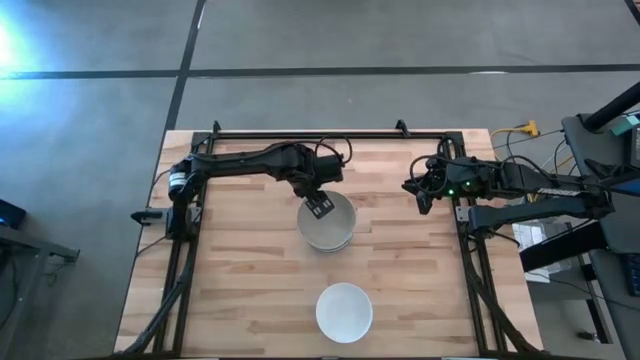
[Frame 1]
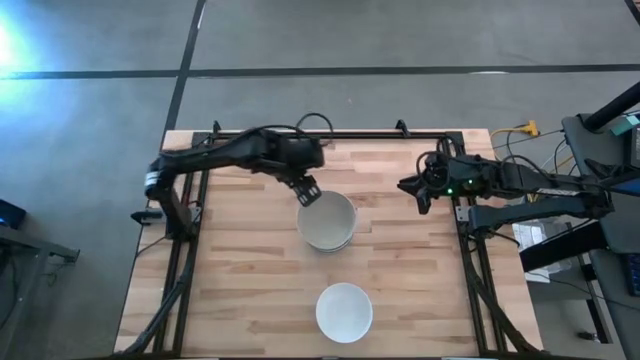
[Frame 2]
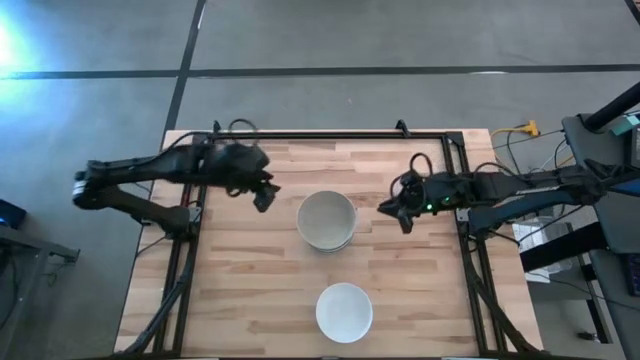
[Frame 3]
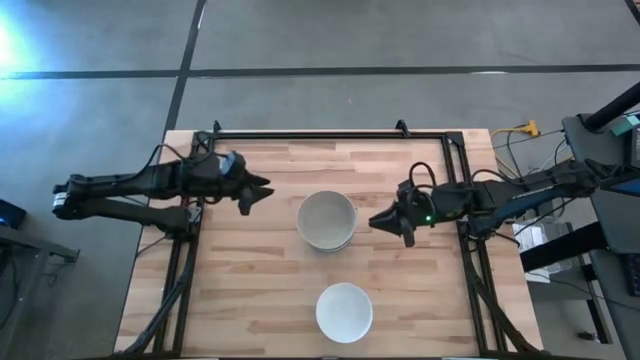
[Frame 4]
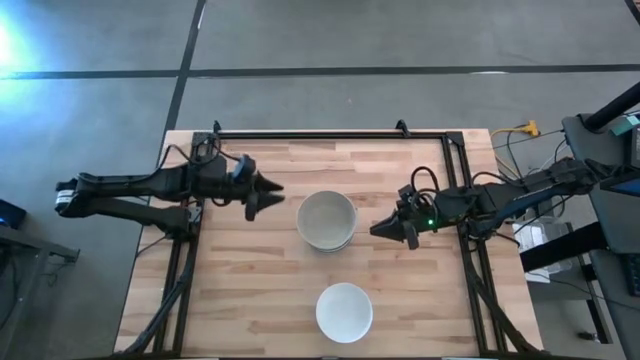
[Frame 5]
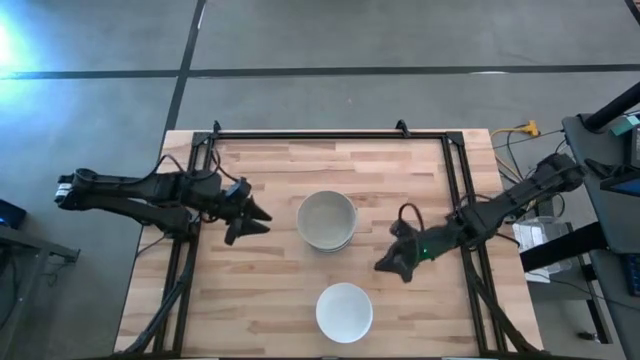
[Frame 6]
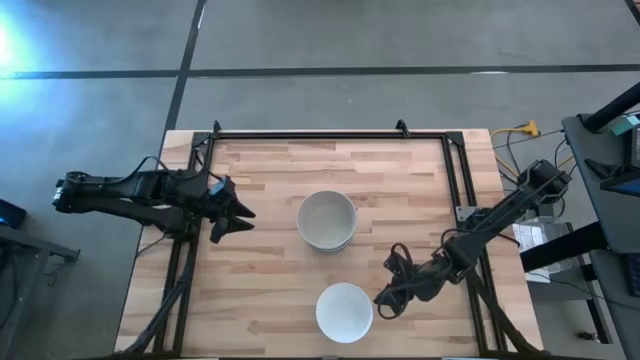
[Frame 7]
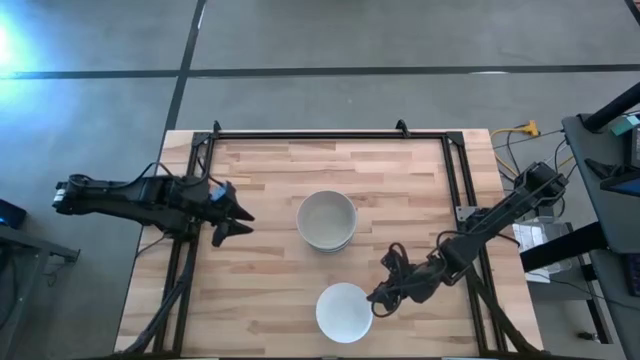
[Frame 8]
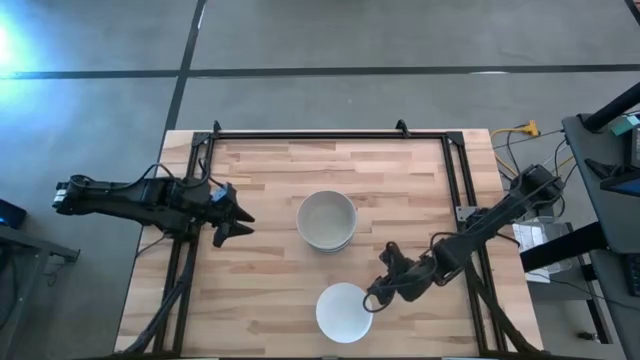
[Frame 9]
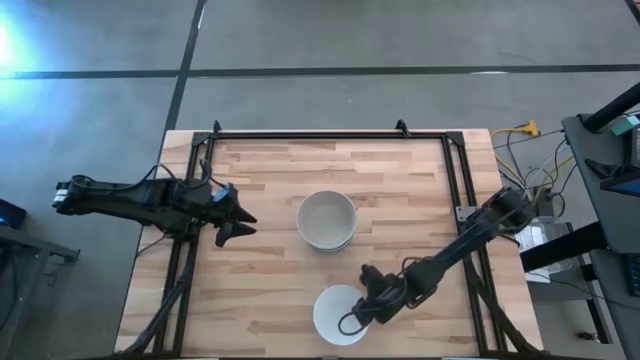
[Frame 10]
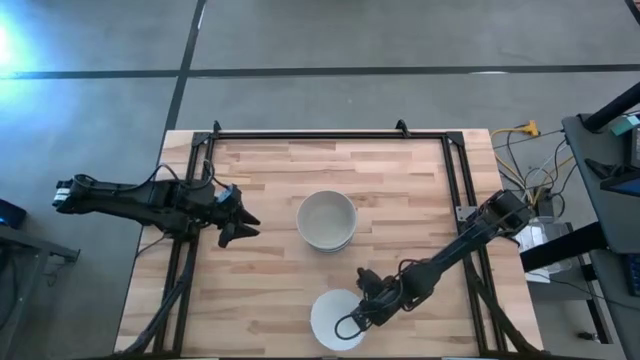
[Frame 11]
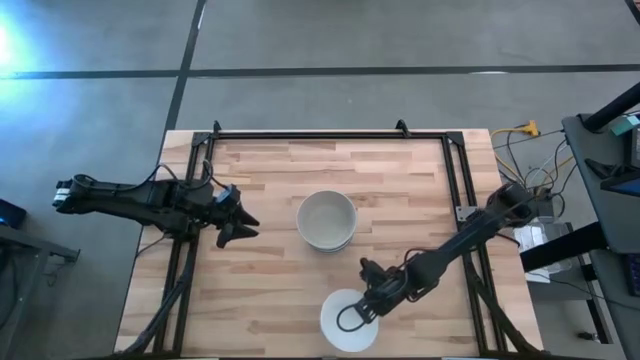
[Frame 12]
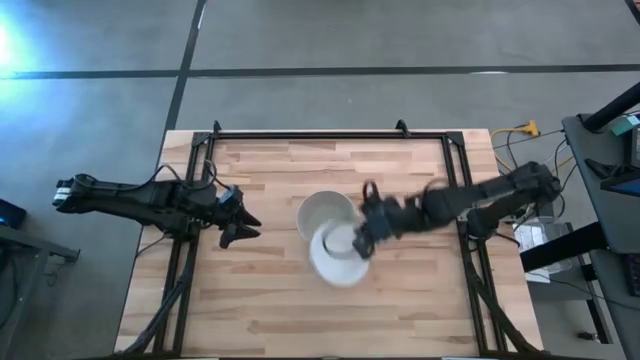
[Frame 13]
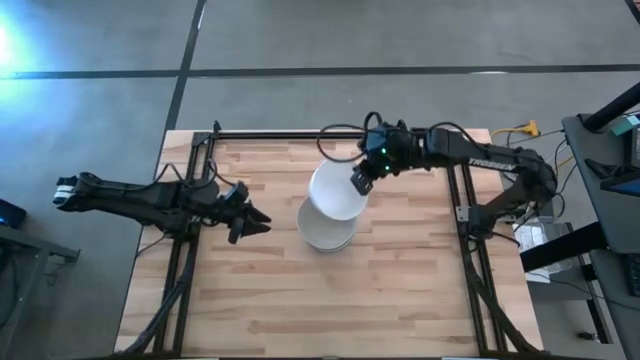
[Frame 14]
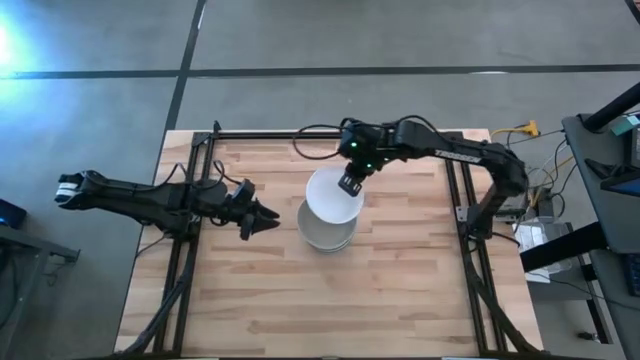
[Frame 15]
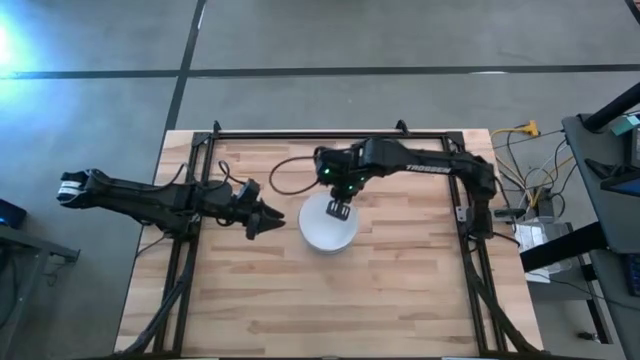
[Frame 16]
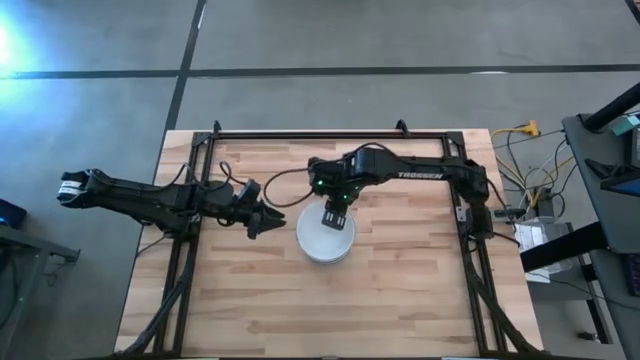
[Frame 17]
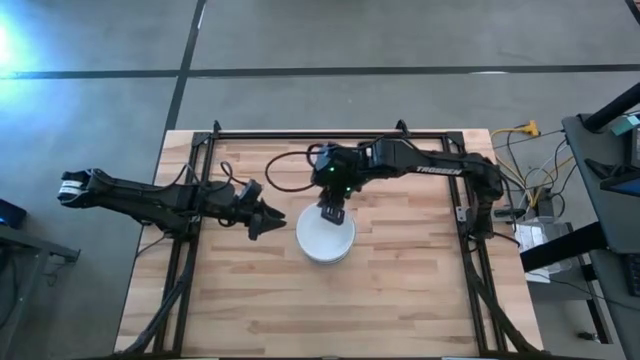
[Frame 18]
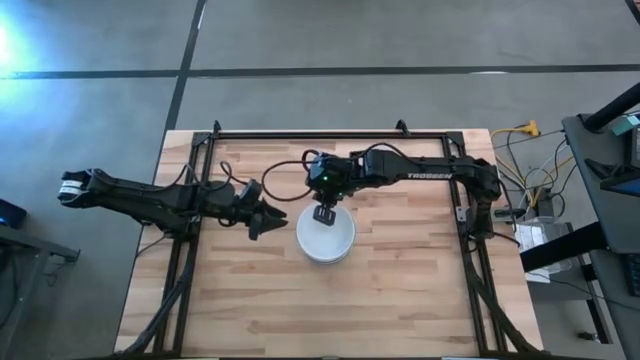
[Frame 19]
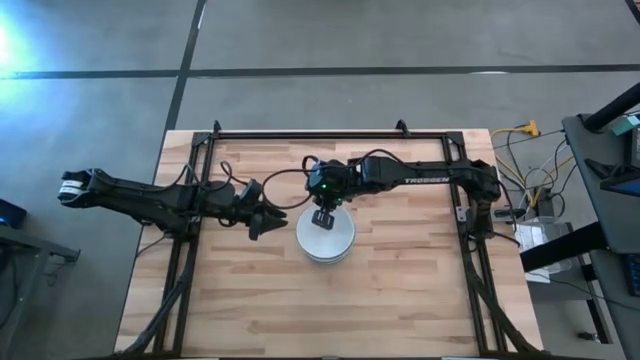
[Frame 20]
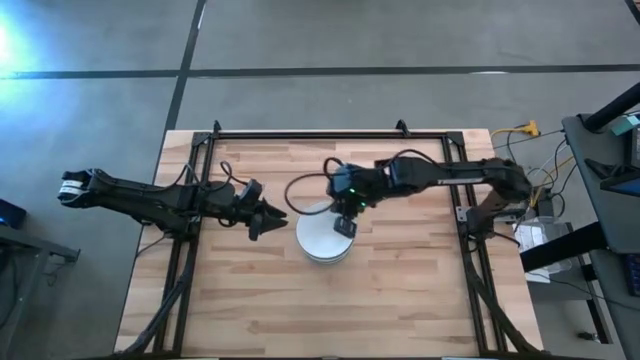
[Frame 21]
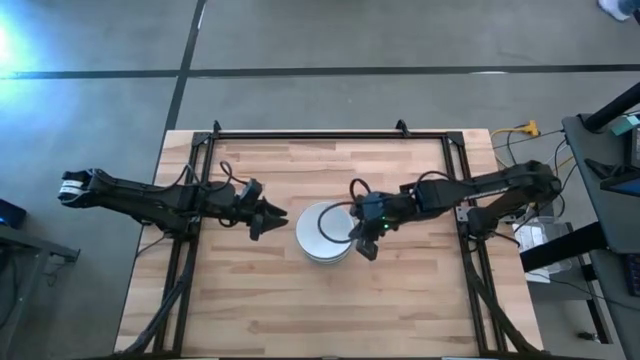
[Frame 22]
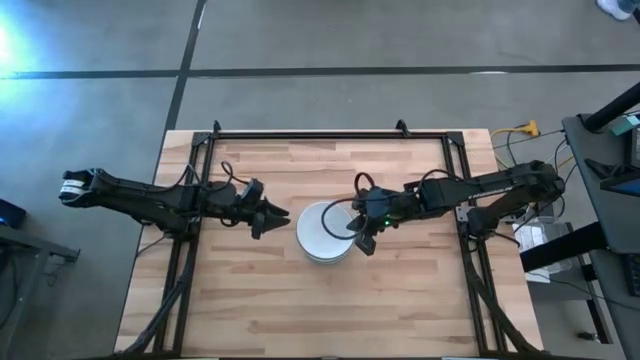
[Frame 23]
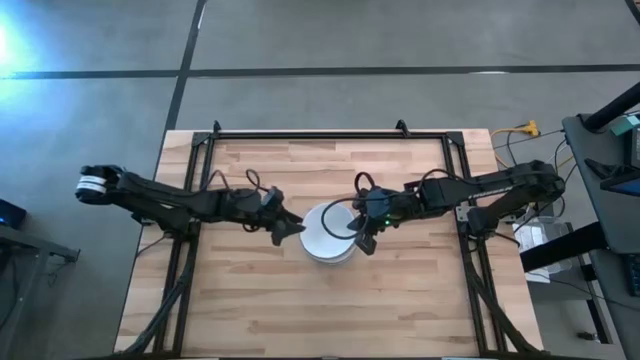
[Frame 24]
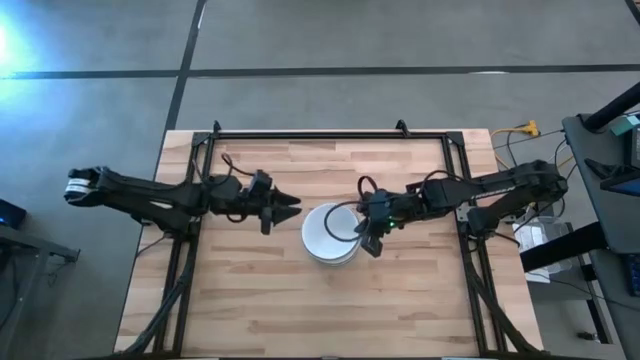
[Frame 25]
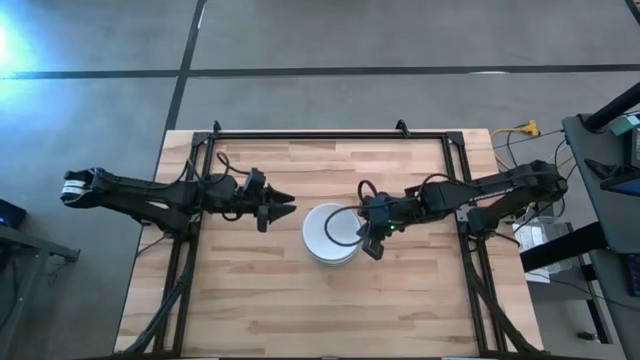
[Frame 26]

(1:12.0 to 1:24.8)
Task: Nest bowls inside each other
Stack the white bowl on top of the light grey bowl

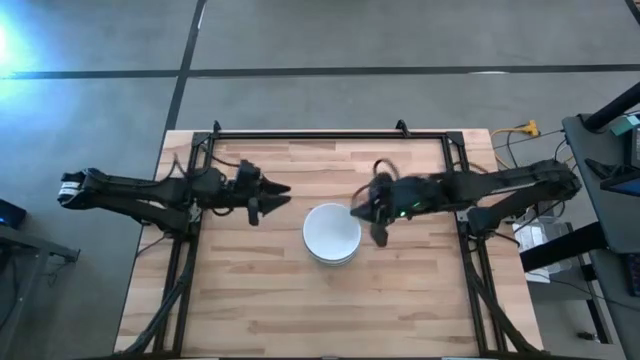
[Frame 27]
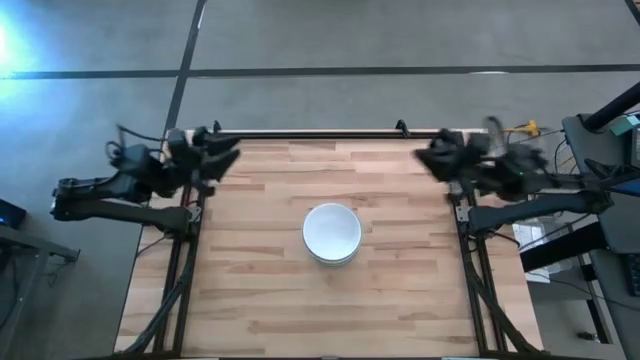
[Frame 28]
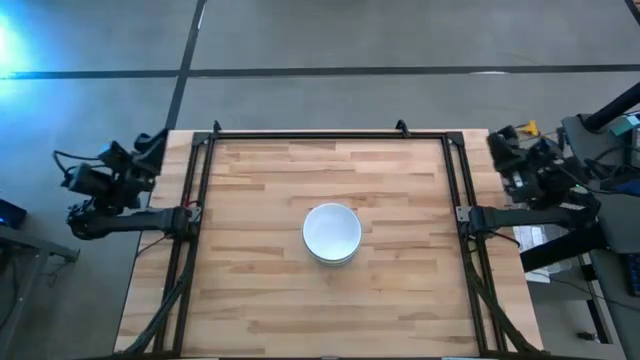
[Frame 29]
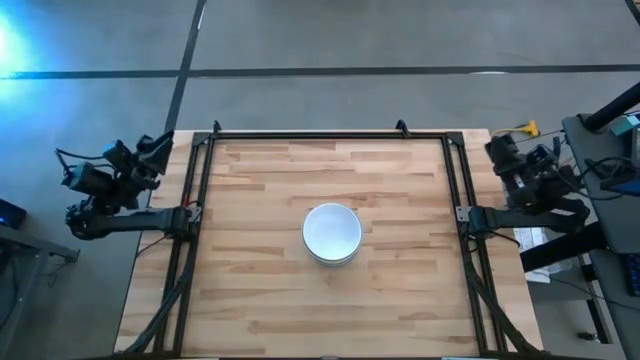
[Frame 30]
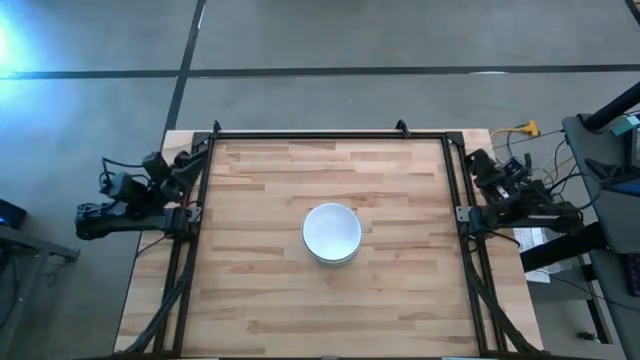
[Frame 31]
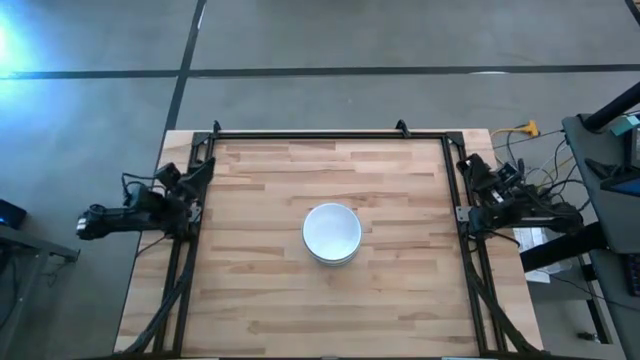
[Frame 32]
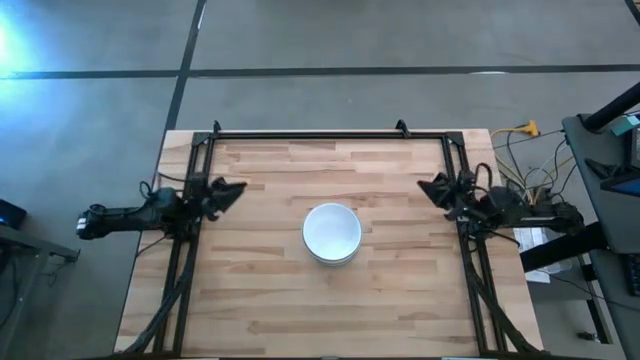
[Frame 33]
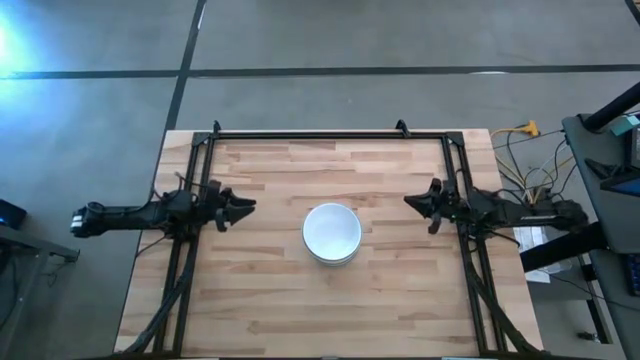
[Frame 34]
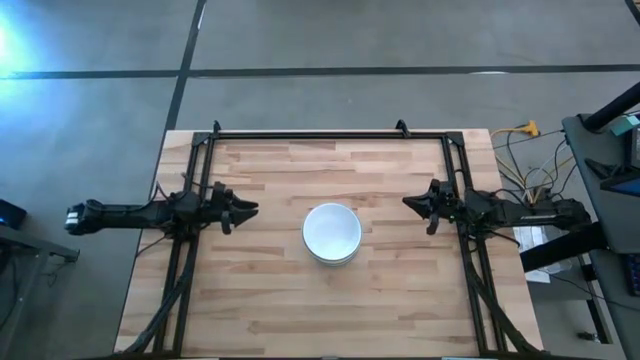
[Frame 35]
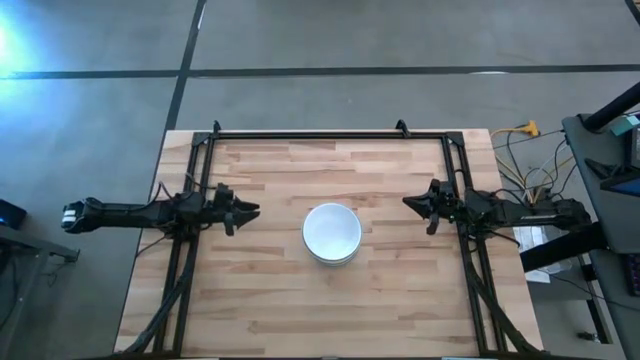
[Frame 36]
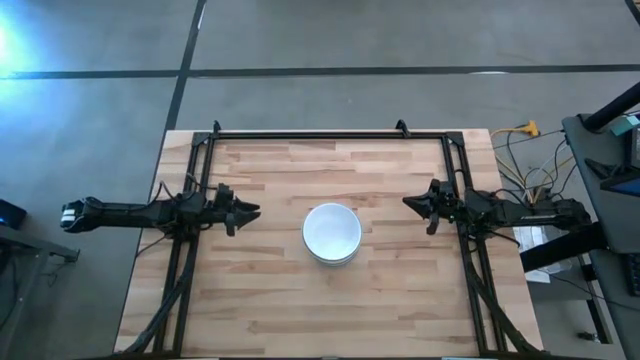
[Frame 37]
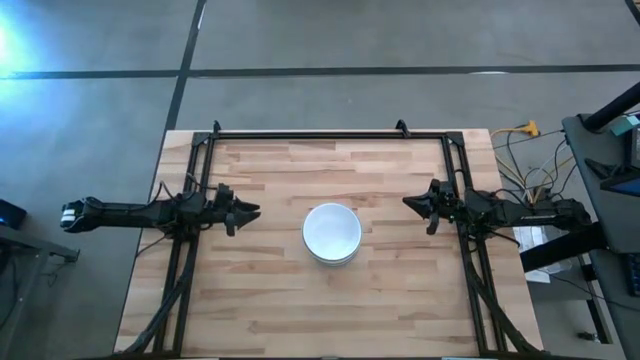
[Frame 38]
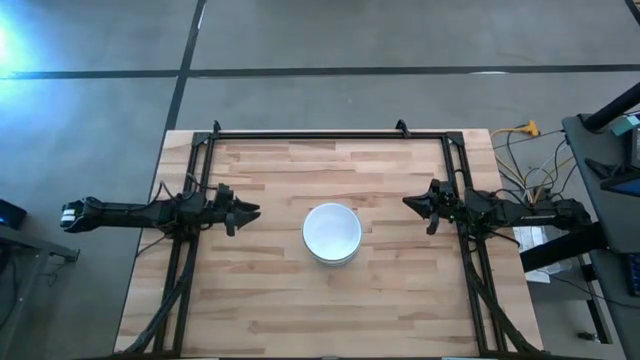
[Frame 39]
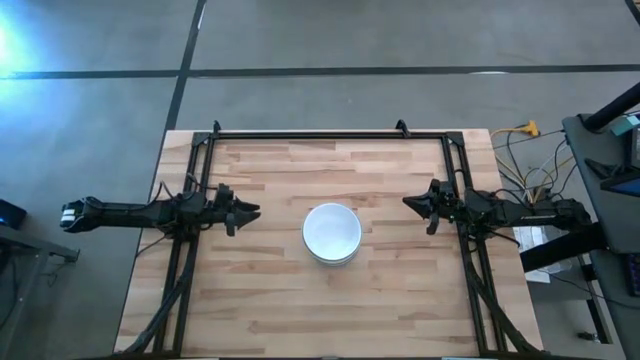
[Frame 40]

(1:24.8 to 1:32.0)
Return to Home Position
